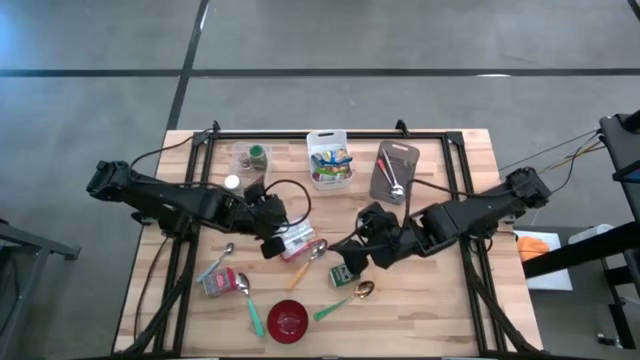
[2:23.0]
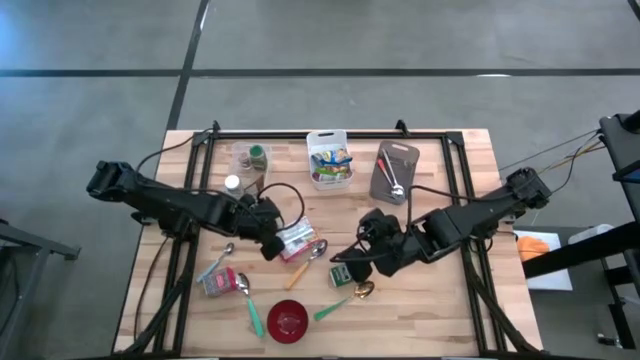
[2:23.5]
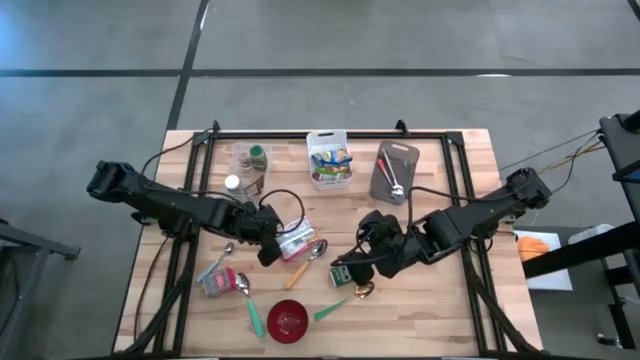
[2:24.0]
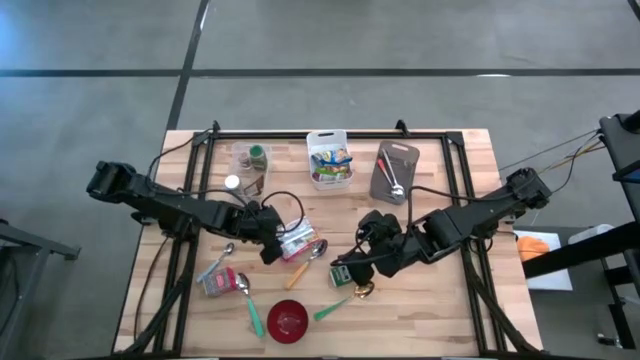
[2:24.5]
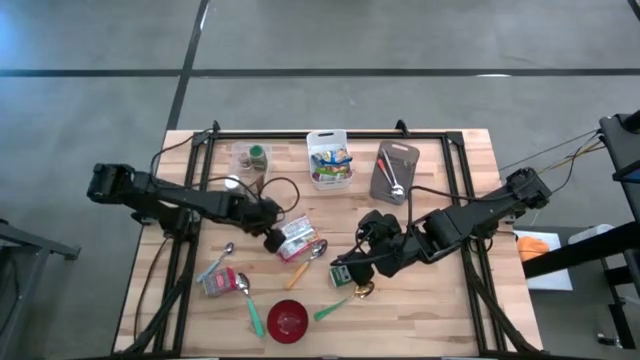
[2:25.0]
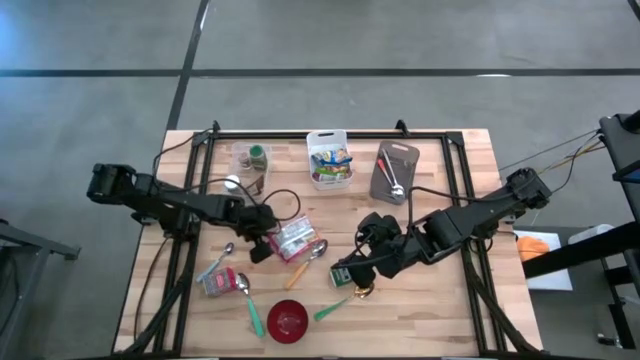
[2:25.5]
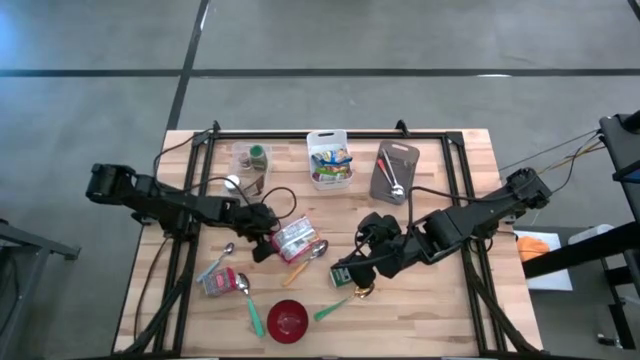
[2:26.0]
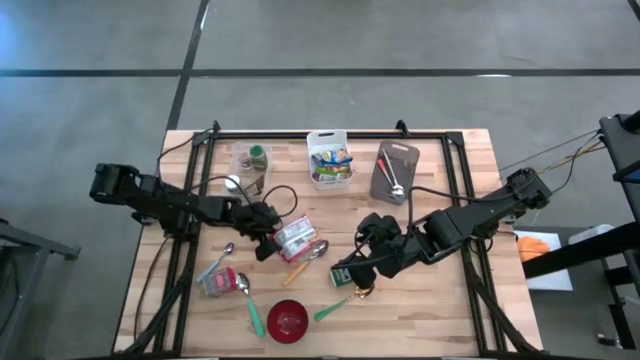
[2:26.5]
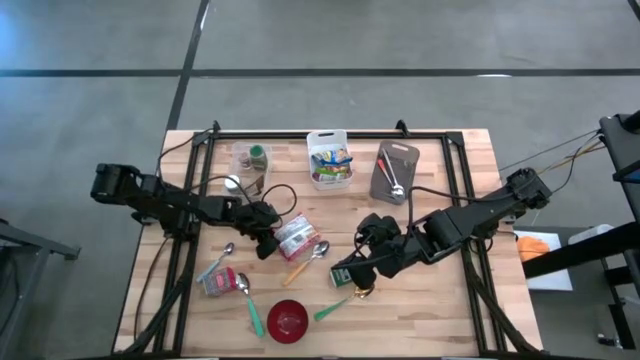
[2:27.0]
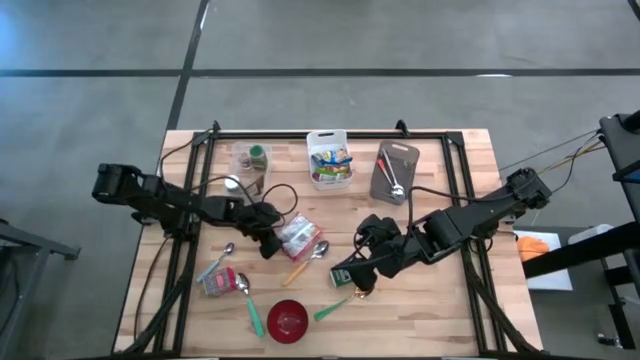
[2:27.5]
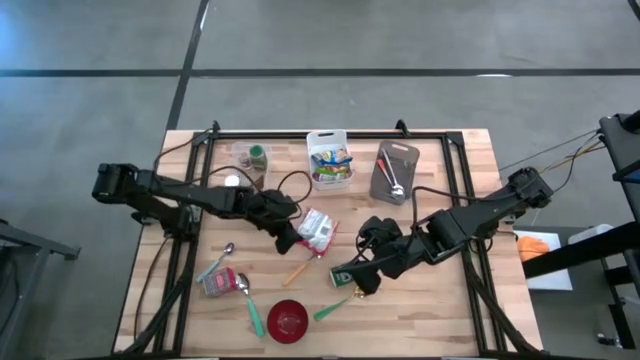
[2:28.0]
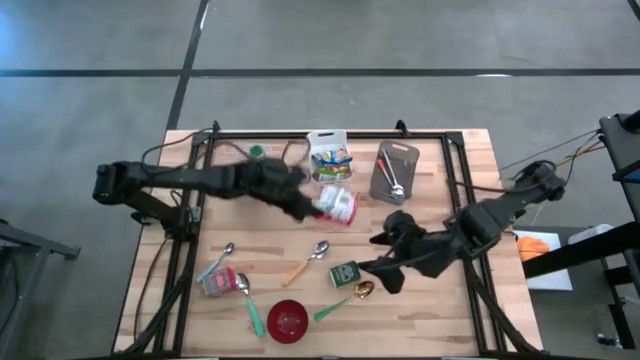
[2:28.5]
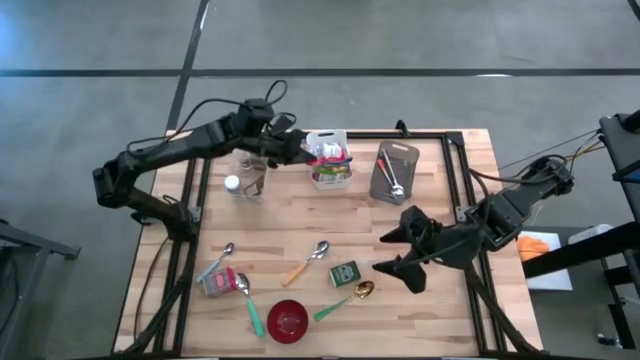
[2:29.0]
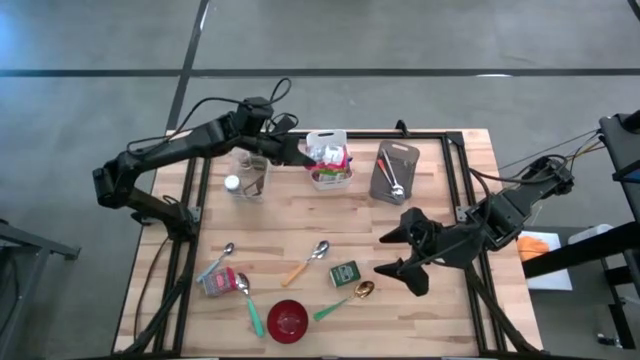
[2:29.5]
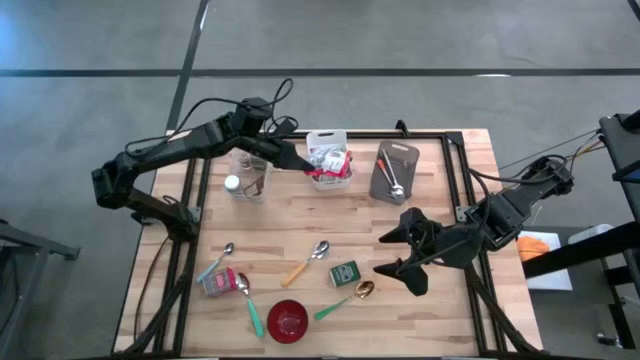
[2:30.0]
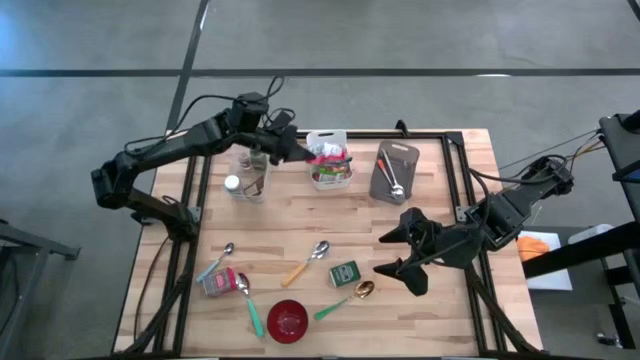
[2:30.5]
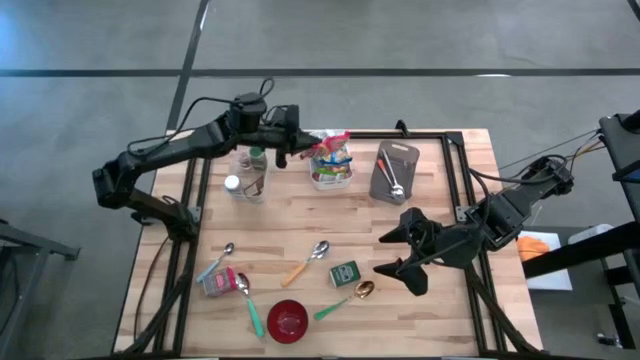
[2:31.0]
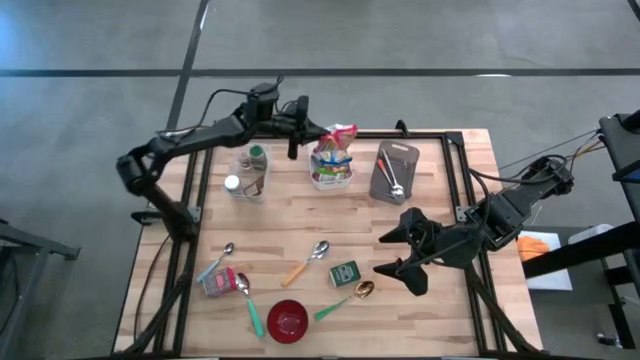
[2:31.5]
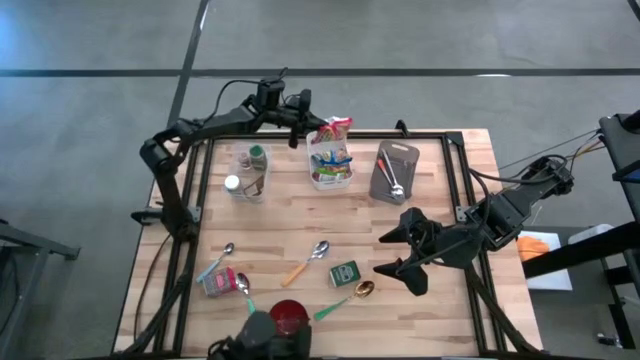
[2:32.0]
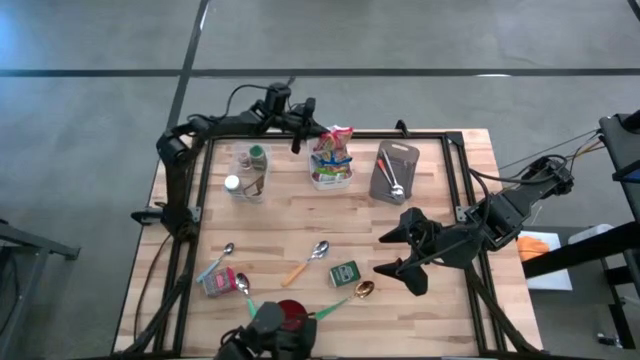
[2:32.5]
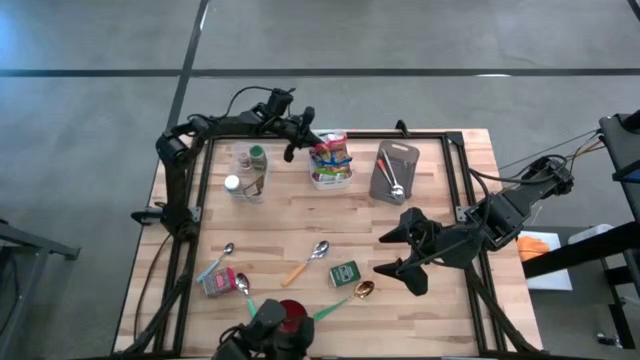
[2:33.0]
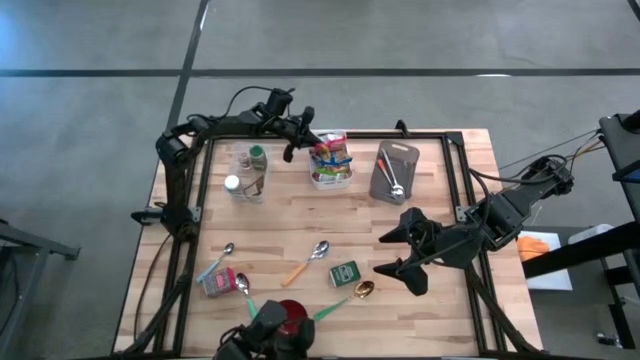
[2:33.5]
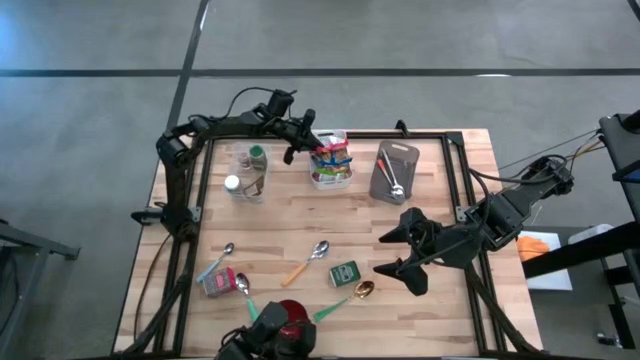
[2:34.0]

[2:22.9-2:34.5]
Put the red noodle pack into the white bin

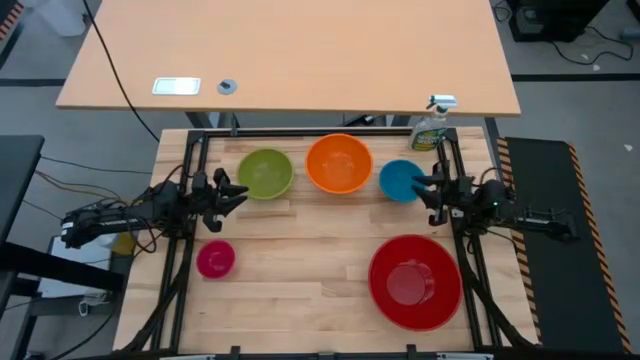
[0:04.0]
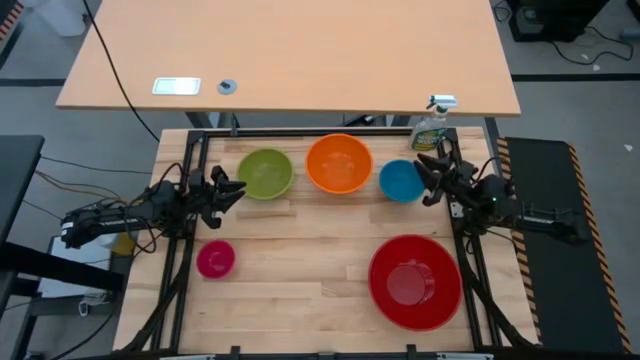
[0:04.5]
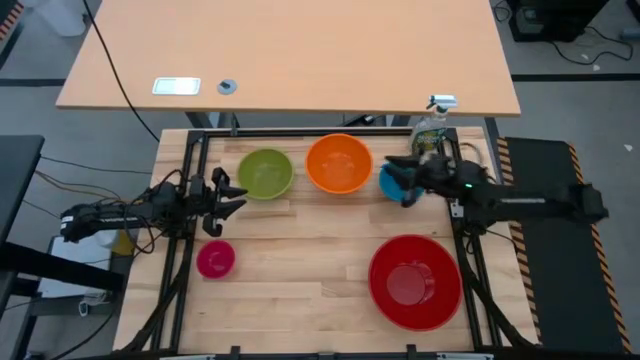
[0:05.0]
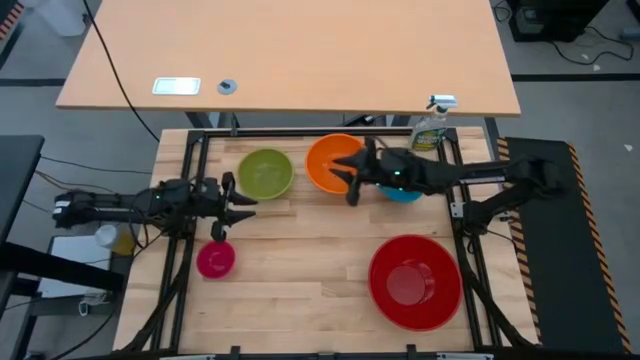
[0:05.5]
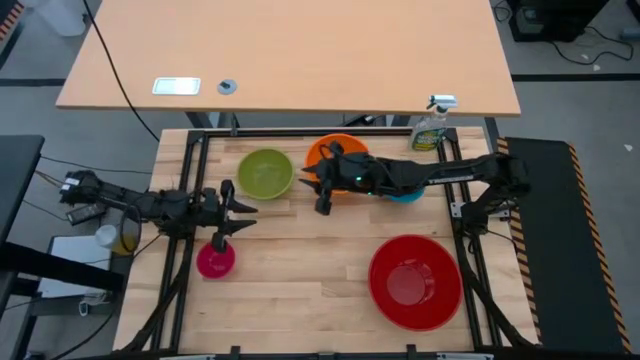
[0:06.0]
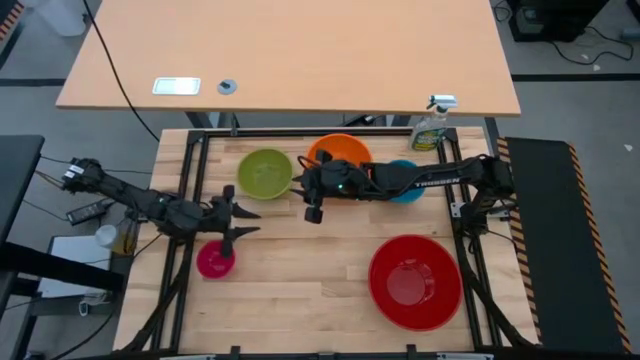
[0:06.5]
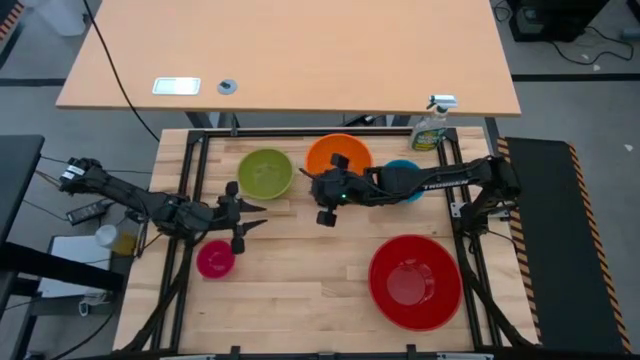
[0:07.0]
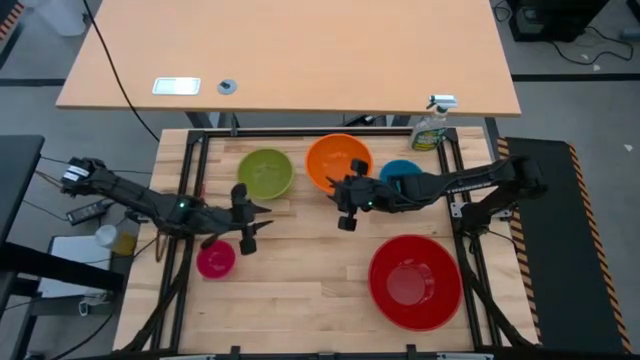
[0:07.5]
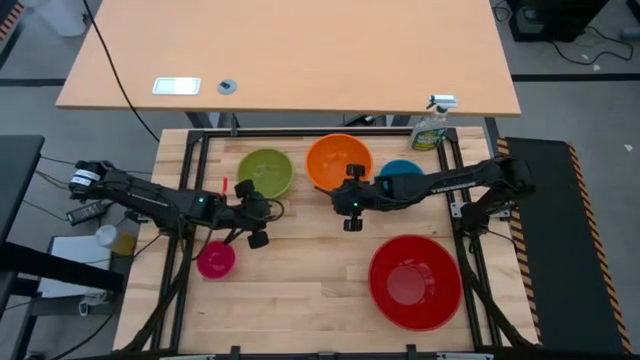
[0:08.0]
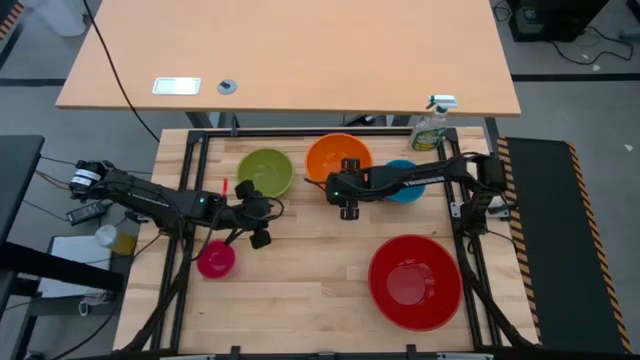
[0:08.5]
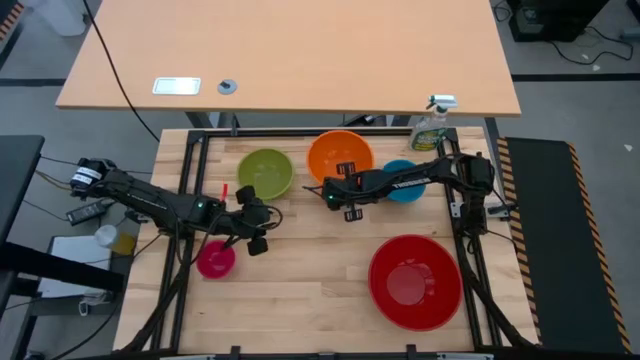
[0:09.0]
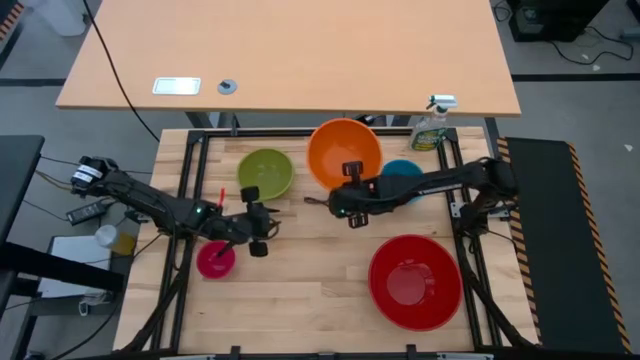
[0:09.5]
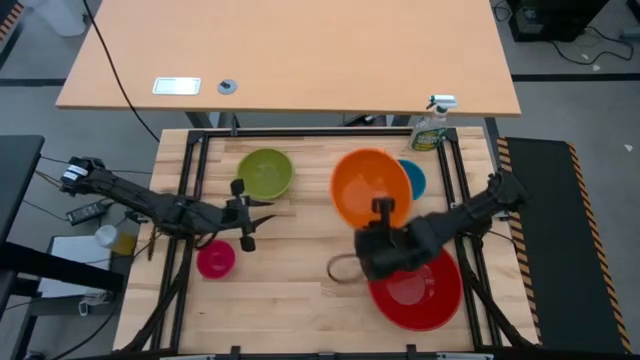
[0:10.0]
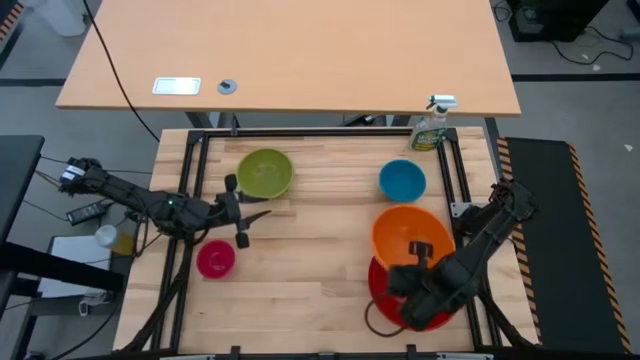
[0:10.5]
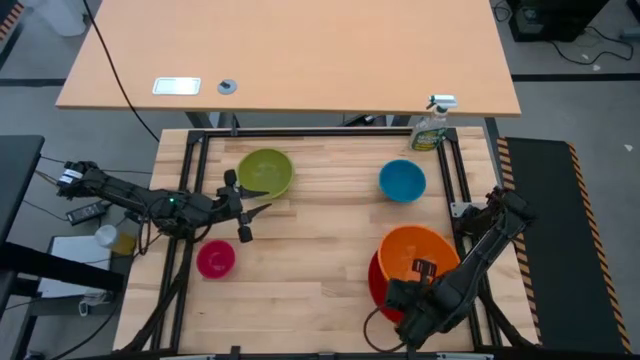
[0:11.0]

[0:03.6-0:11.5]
Stack the orange bowl on top of the red bowl

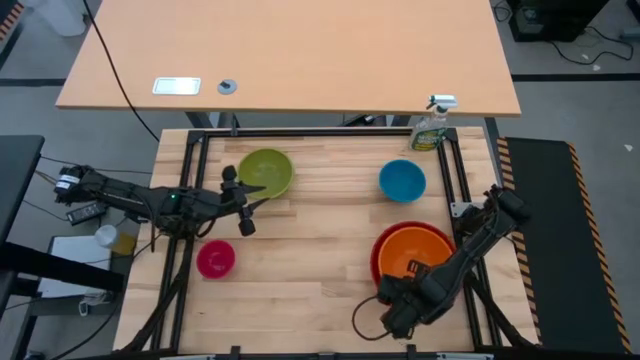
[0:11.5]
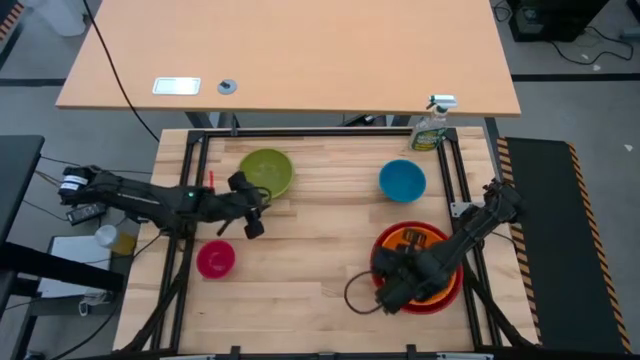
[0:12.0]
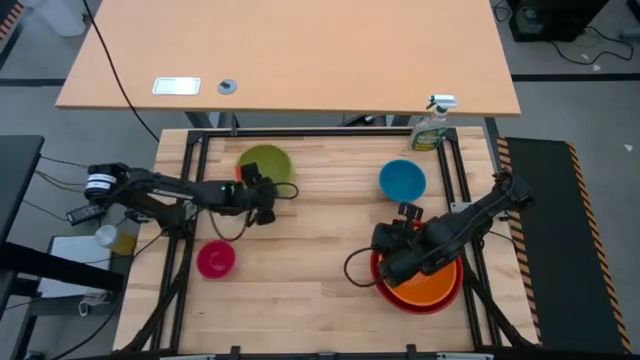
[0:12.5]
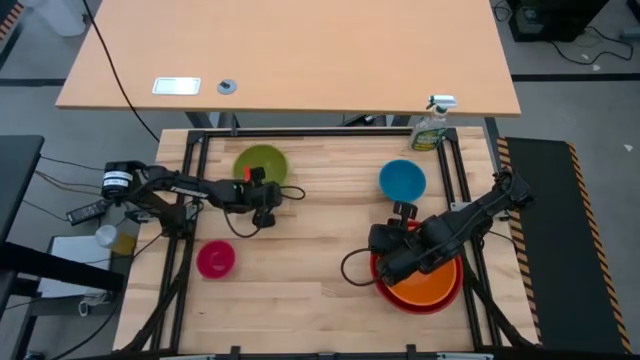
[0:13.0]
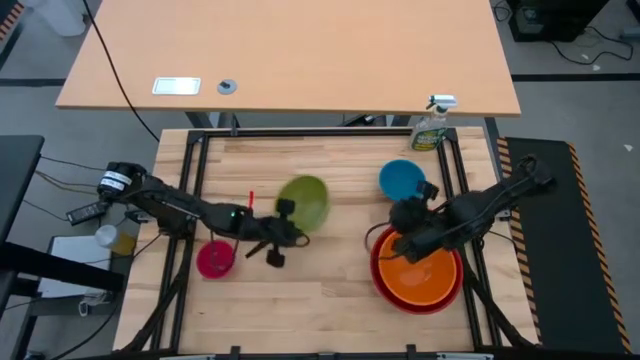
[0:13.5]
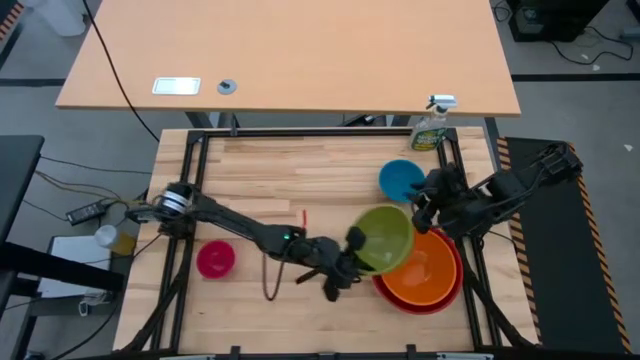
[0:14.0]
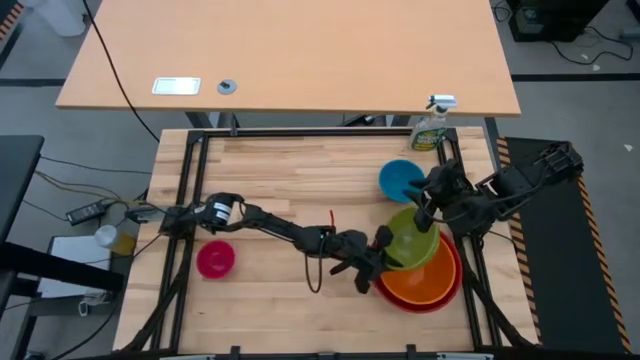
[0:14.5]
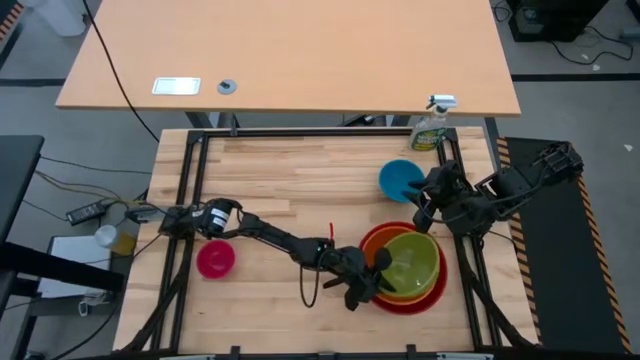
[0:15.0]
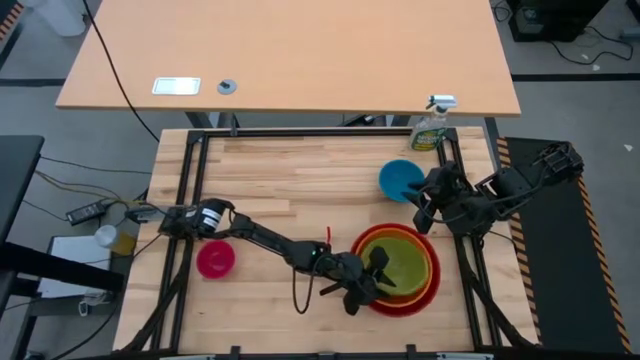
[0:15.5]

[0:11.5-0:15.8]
Stack the green bowl on top of the orange bowl
